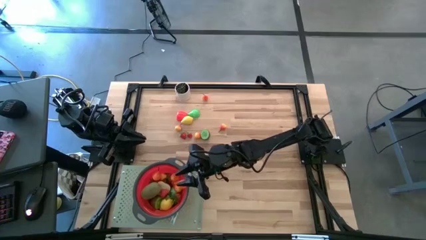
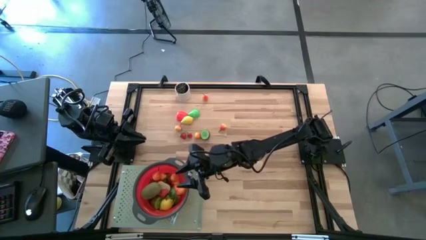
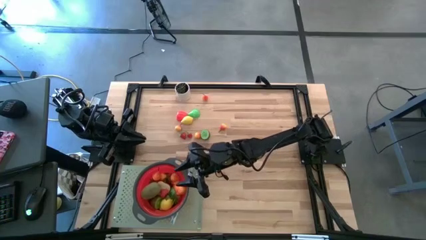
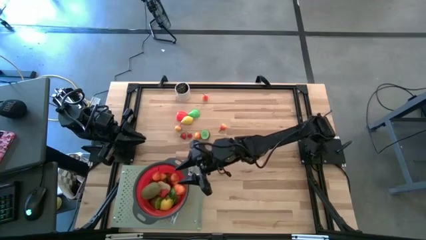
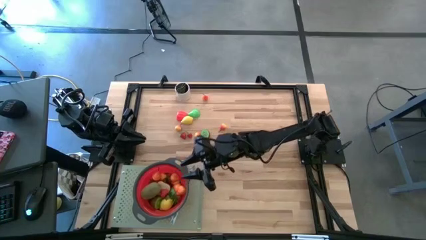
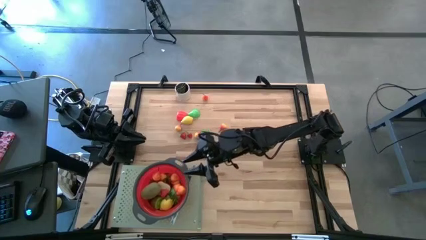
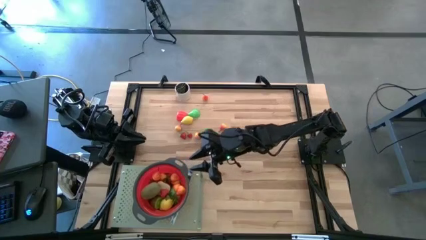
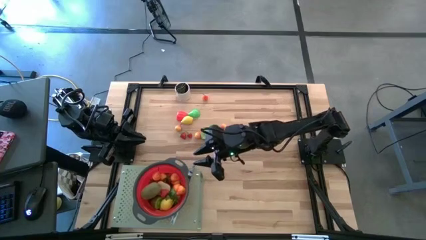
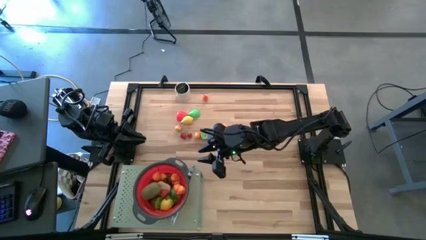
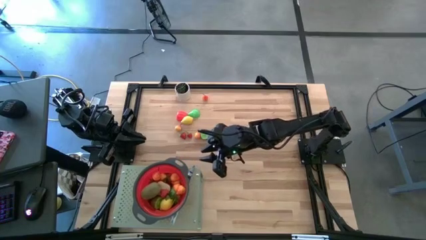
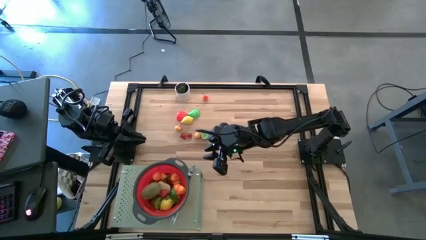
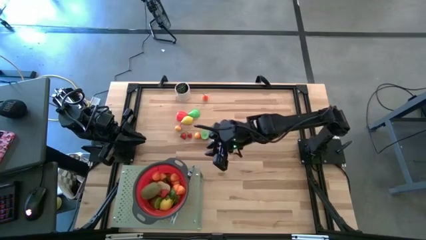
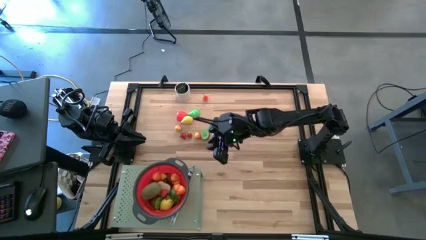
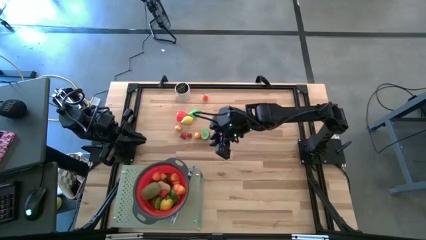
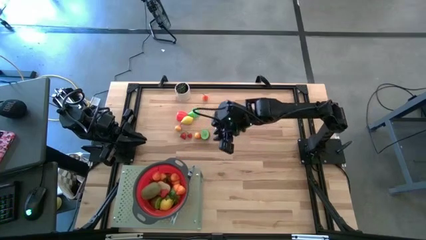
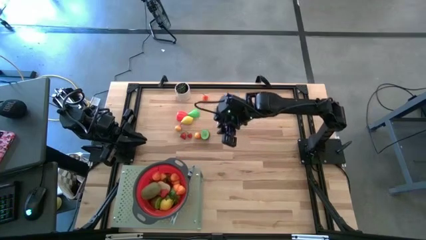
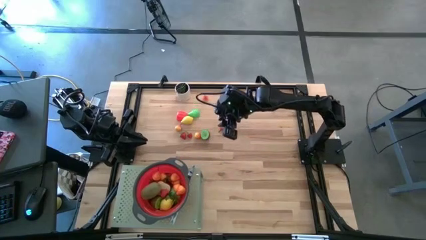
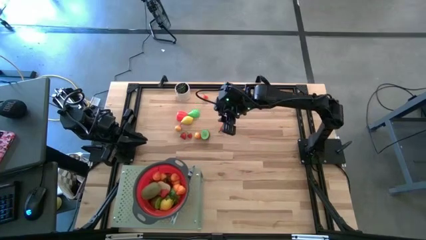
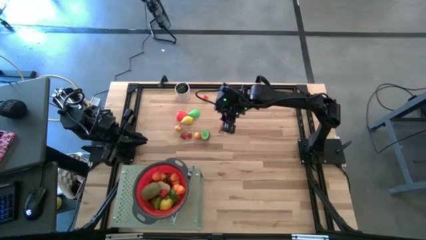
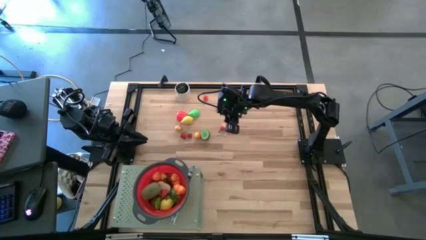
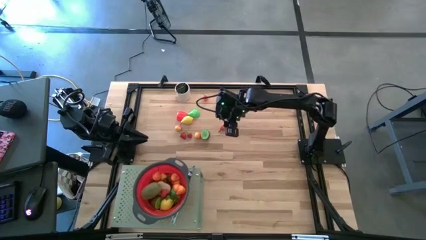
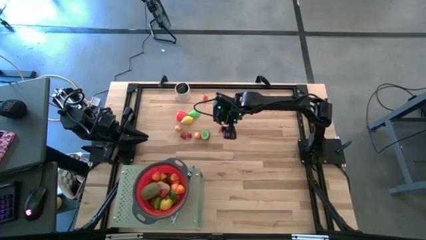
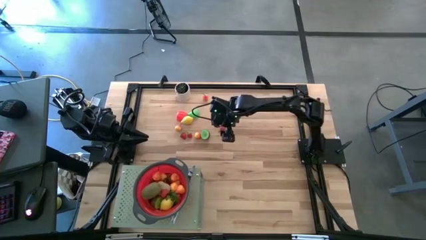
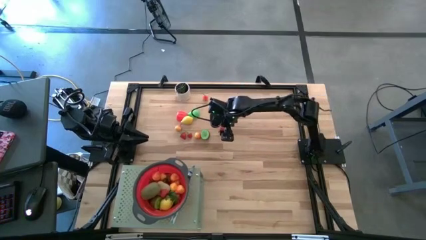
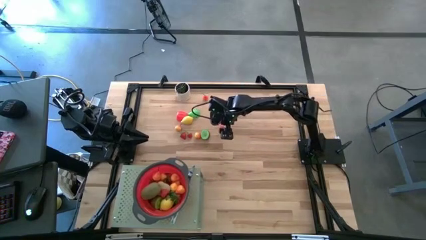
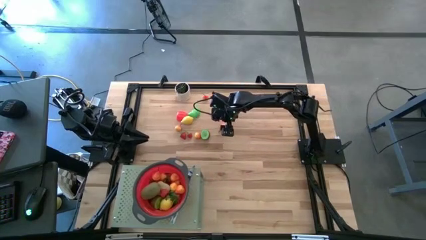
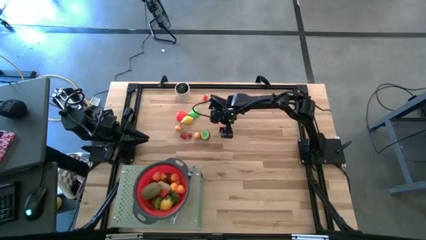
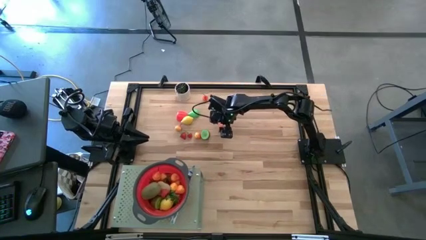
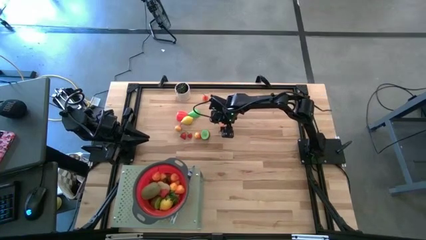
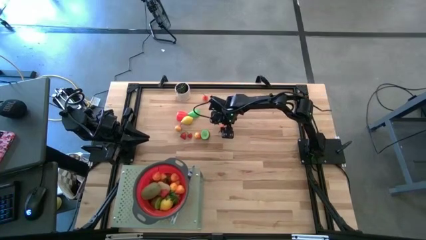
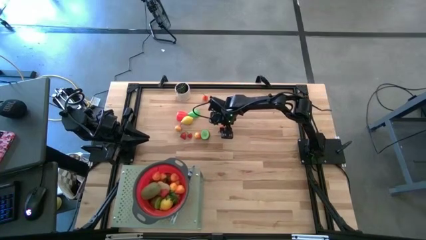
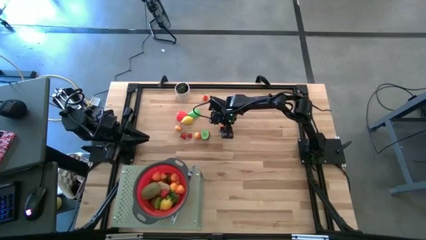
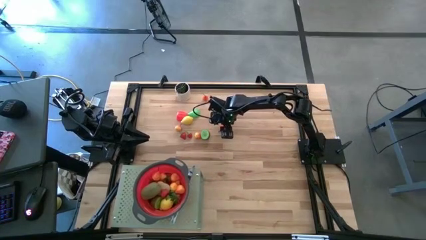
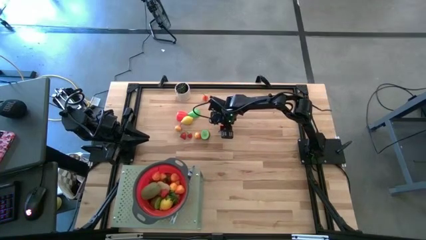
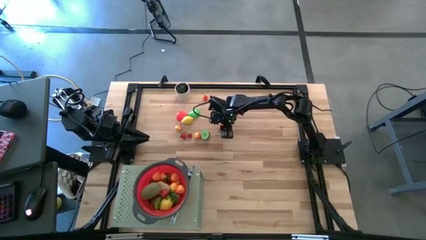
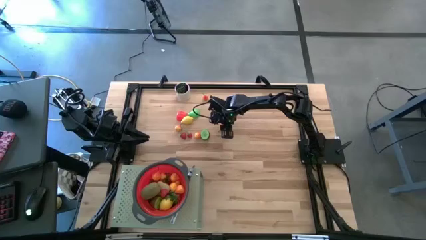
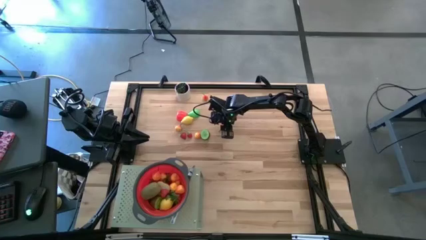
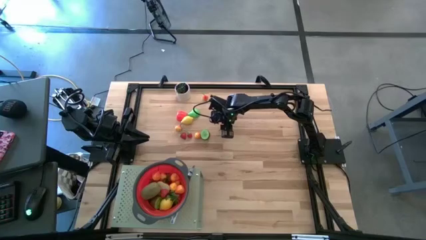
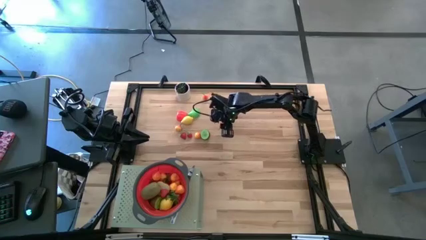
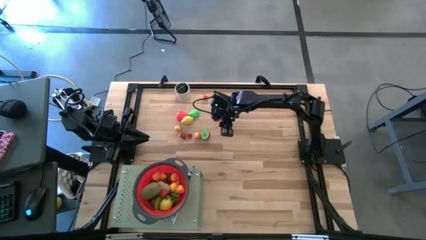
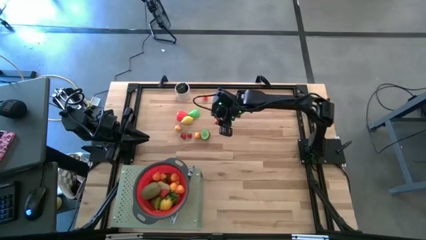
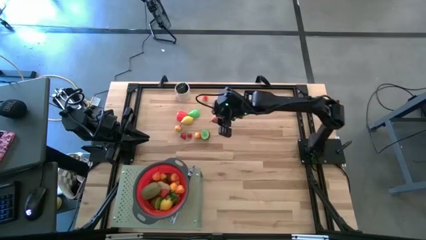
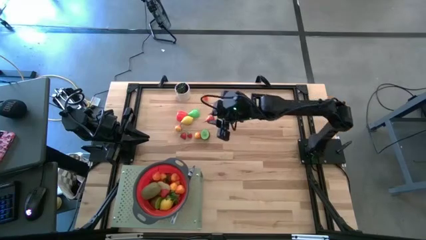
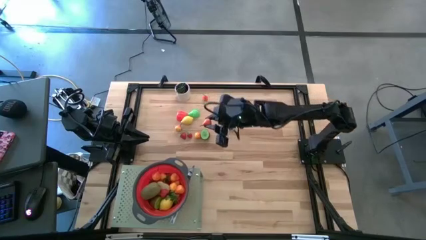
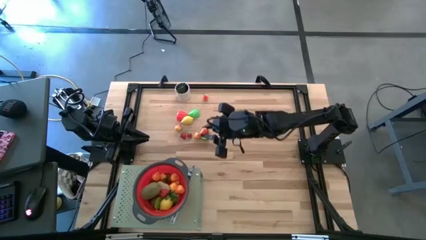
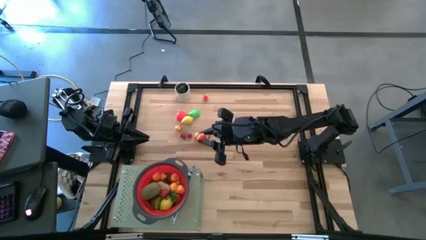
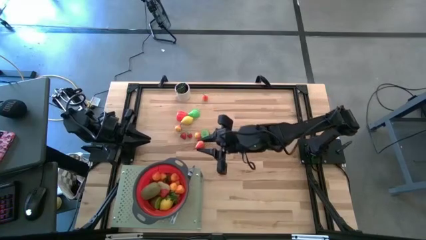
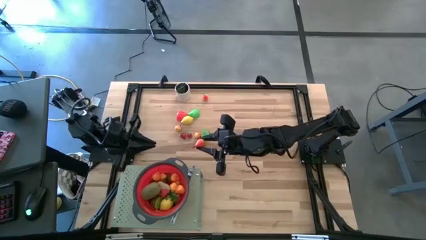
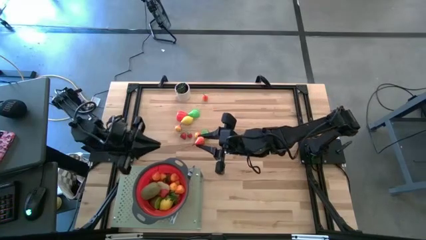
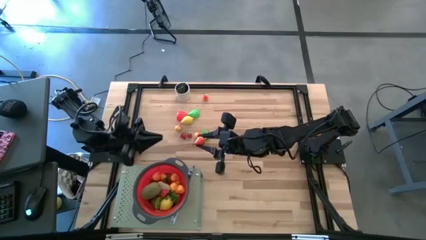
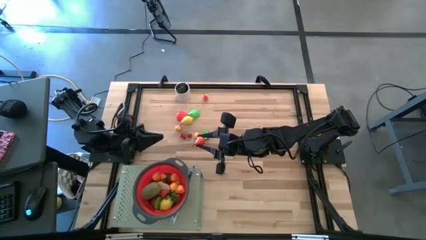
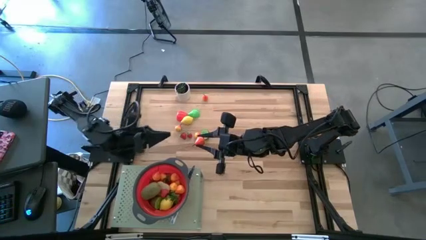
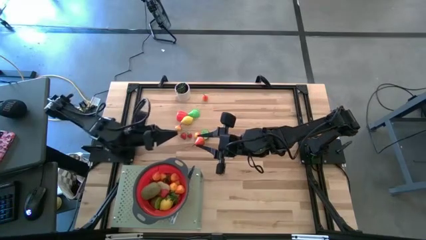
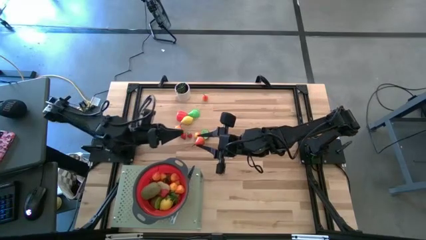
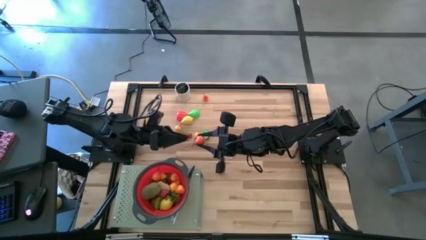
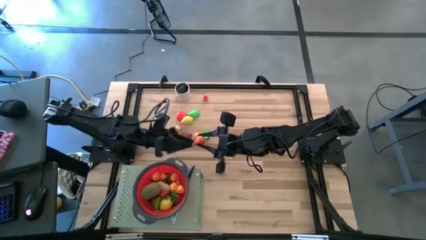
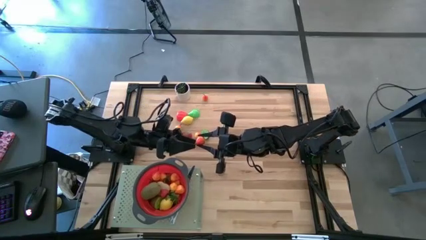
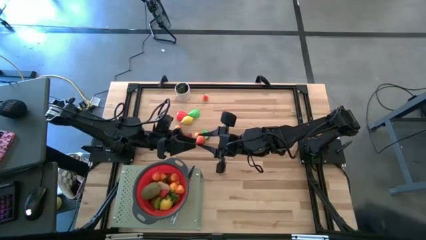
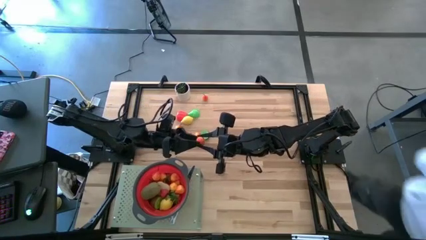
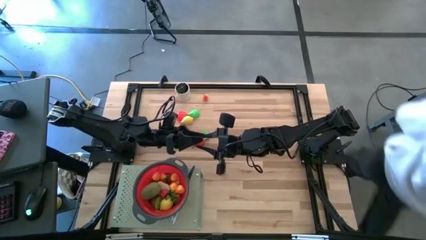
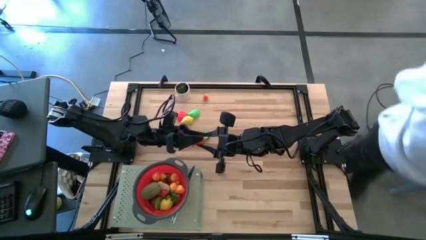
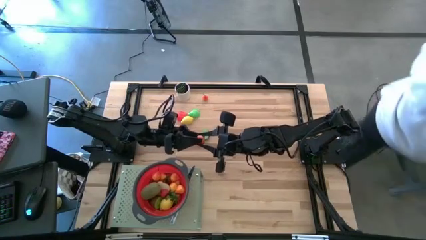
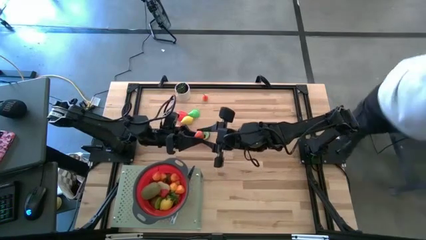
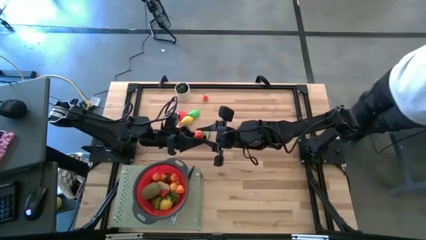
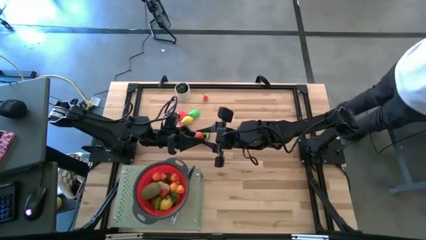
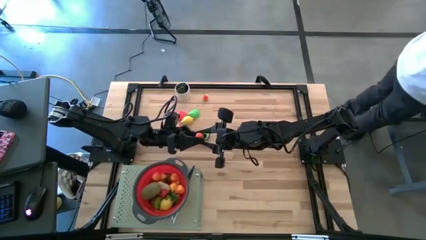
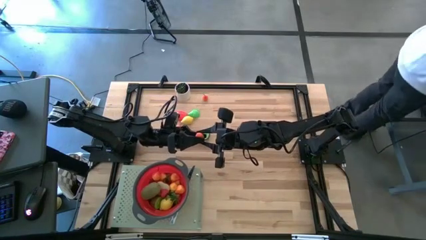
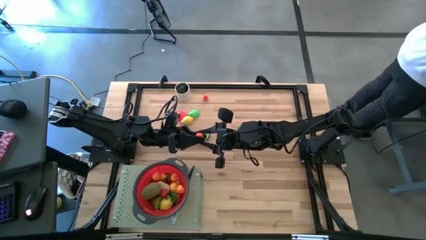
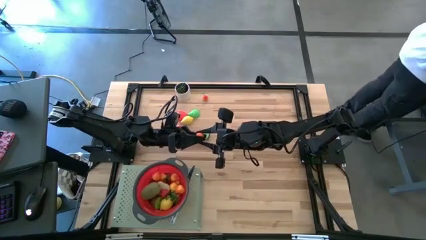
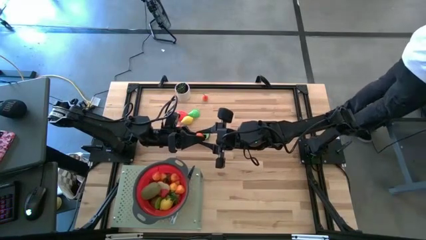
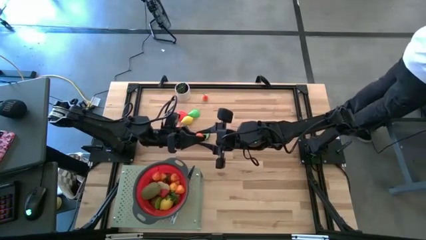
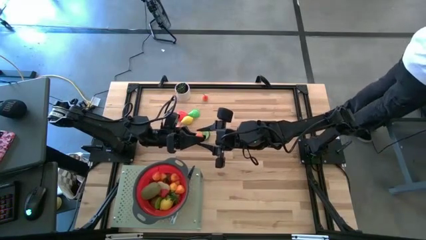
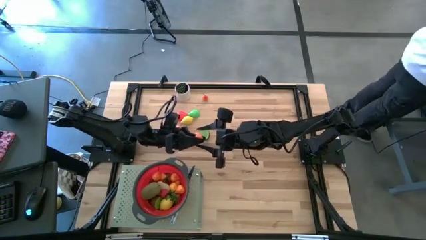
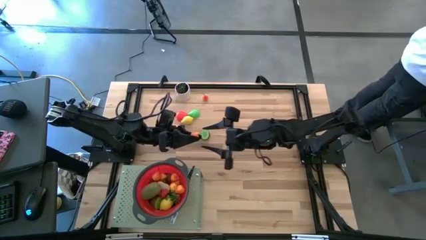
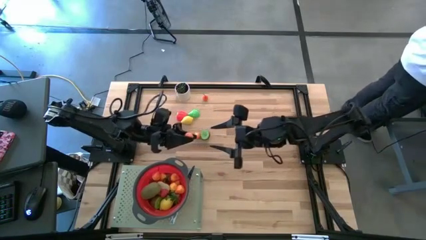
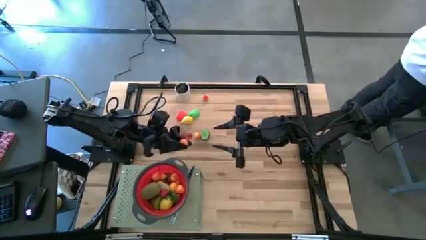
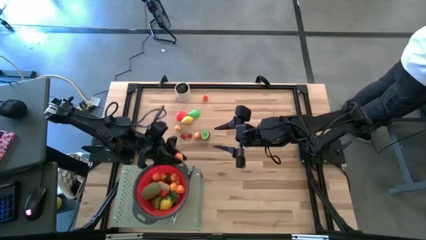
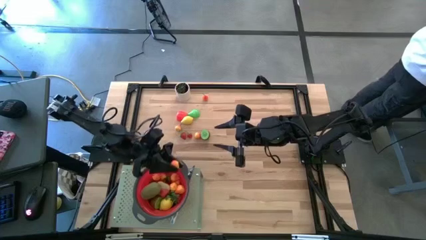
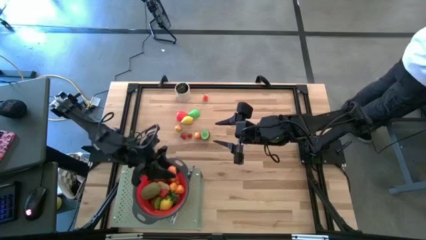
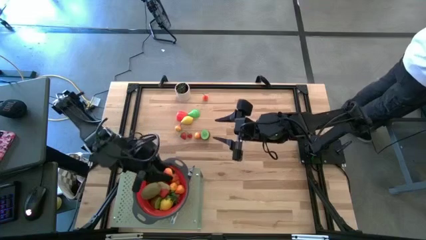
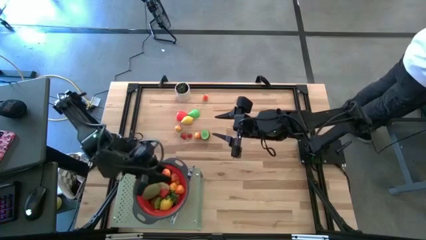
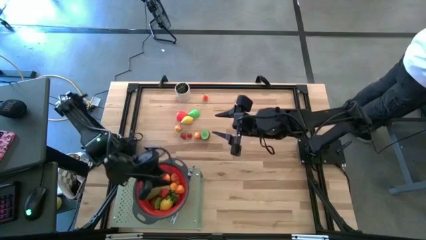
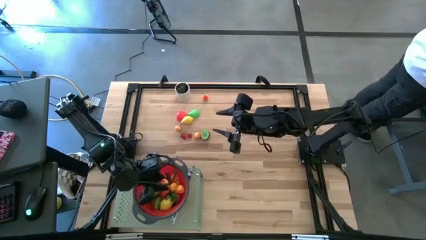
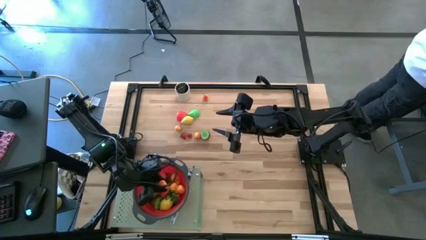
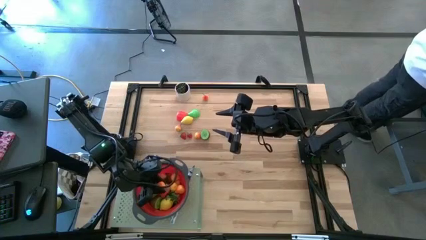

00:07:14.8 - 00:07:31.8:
Task: Pick & Place Fruit
Put the pear into the red strainer bowl on the shelf
